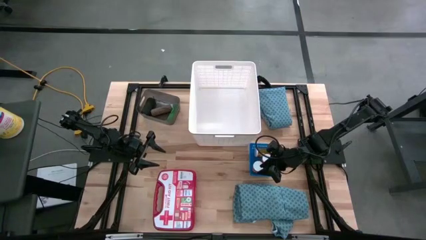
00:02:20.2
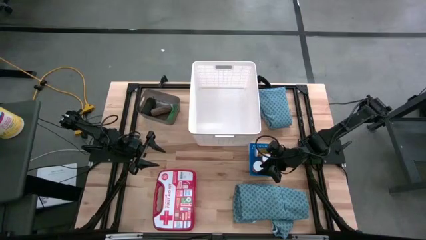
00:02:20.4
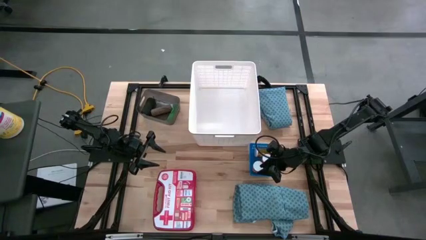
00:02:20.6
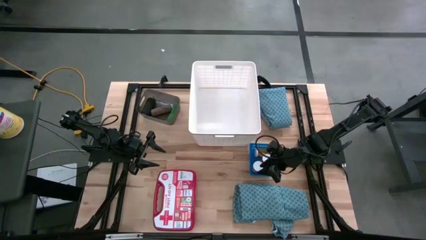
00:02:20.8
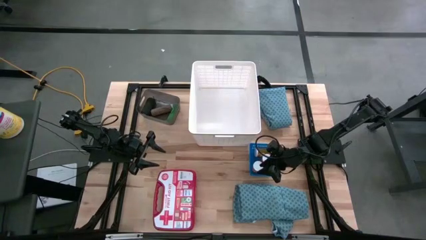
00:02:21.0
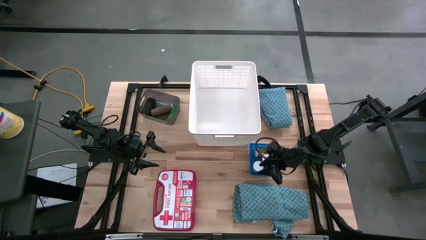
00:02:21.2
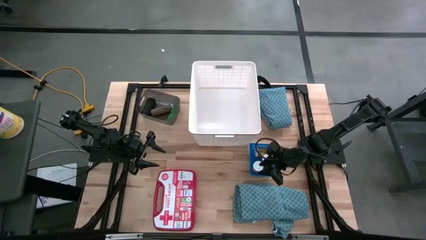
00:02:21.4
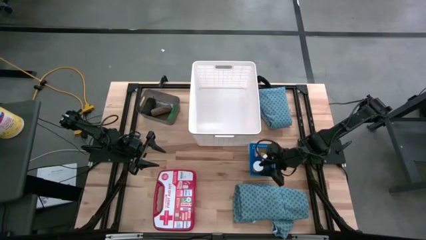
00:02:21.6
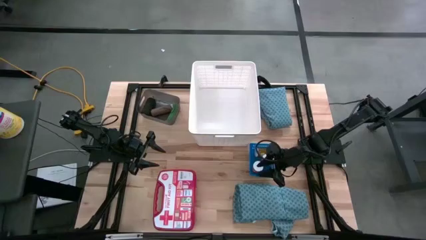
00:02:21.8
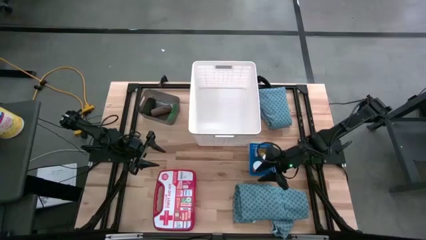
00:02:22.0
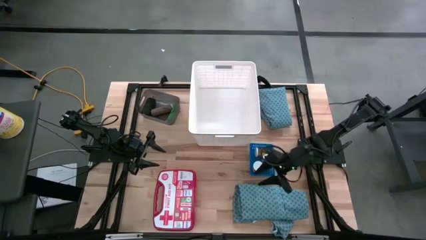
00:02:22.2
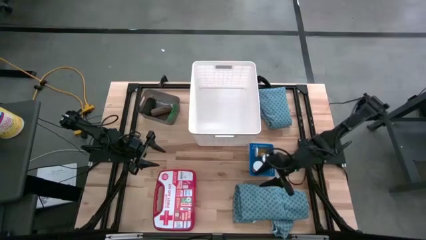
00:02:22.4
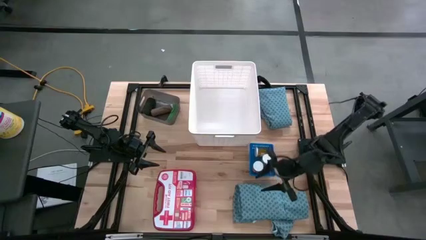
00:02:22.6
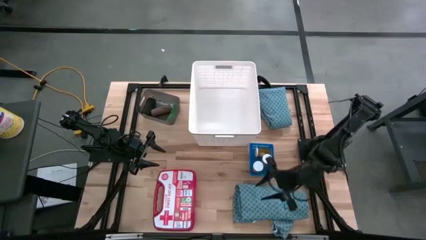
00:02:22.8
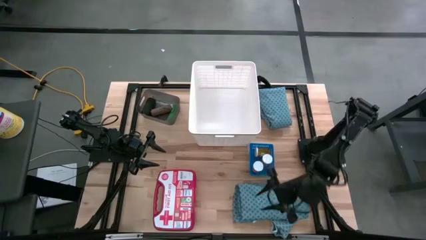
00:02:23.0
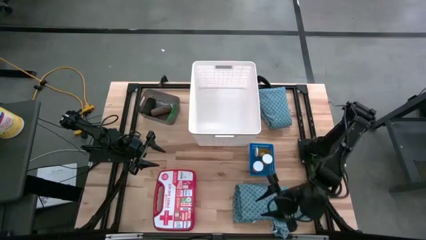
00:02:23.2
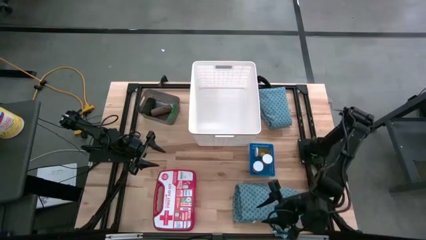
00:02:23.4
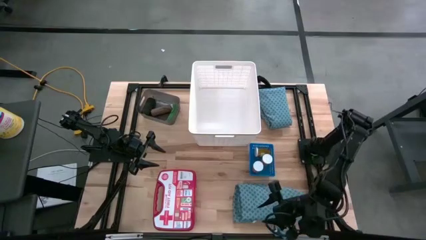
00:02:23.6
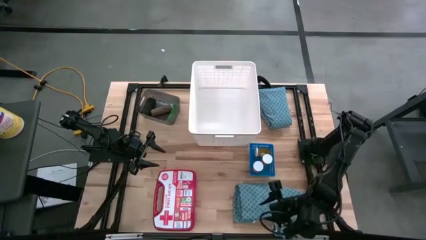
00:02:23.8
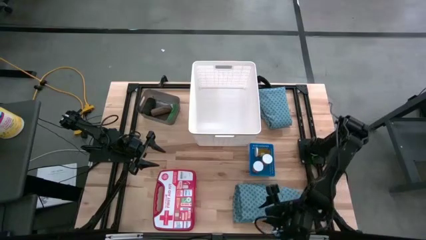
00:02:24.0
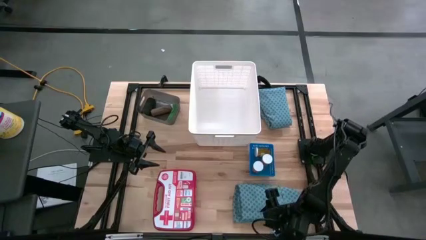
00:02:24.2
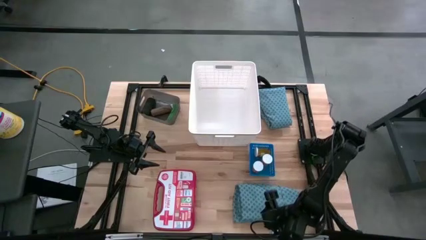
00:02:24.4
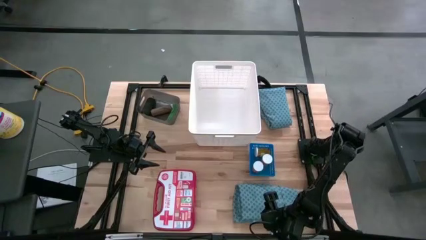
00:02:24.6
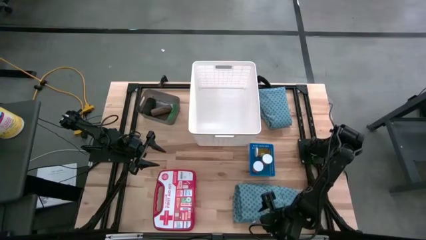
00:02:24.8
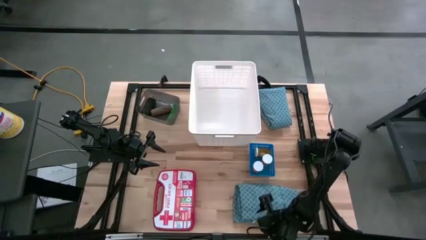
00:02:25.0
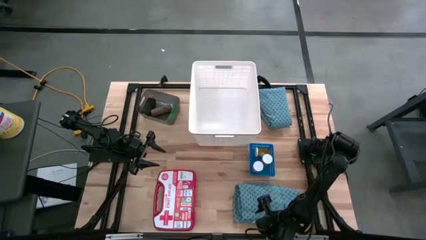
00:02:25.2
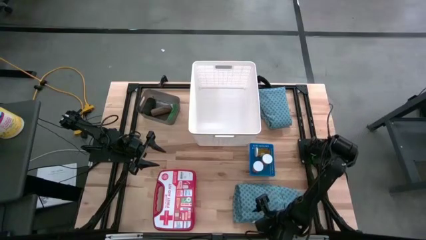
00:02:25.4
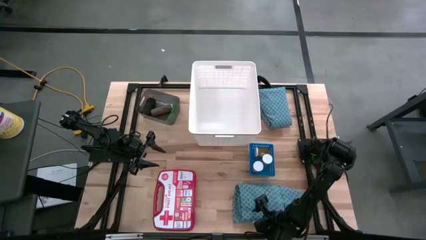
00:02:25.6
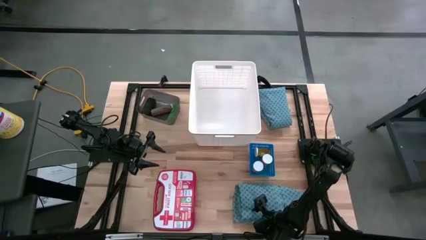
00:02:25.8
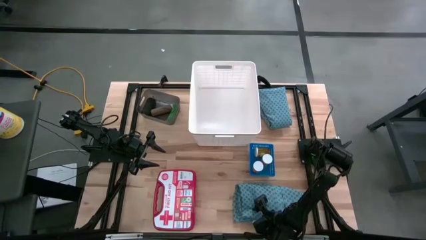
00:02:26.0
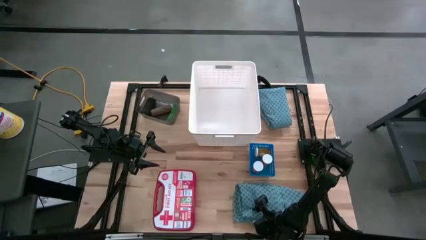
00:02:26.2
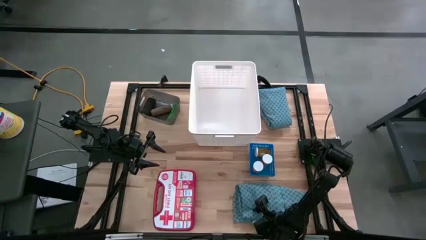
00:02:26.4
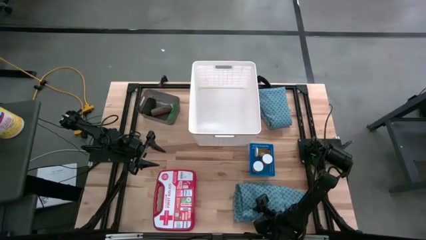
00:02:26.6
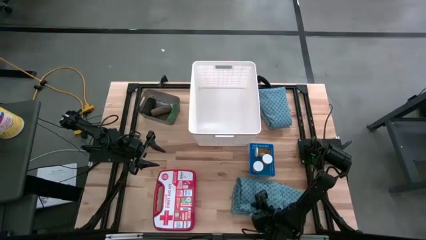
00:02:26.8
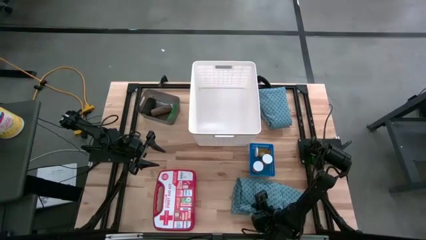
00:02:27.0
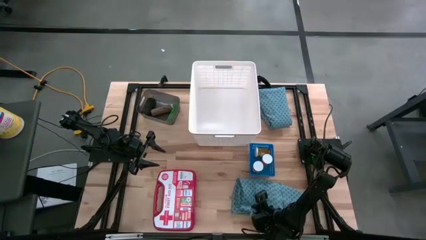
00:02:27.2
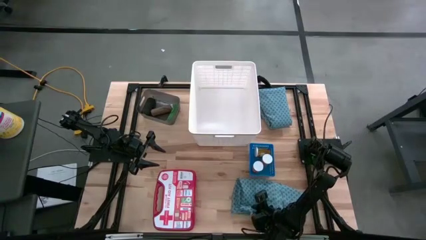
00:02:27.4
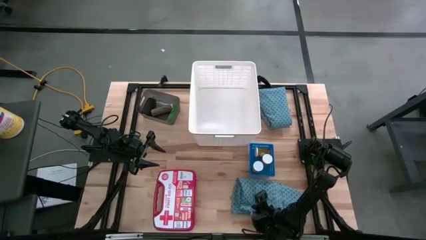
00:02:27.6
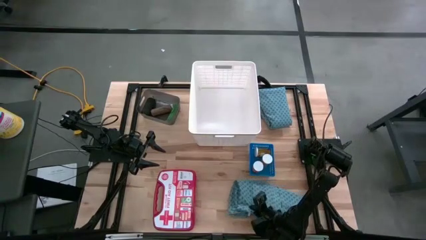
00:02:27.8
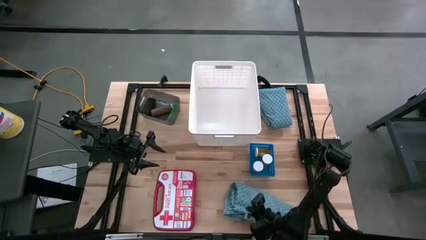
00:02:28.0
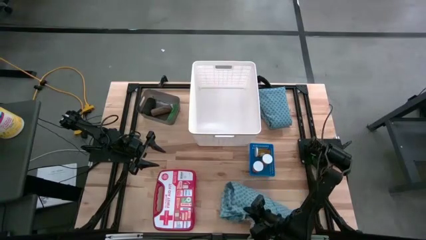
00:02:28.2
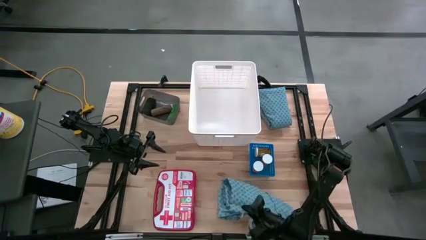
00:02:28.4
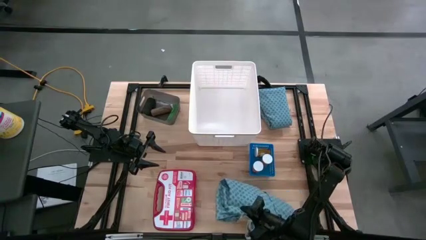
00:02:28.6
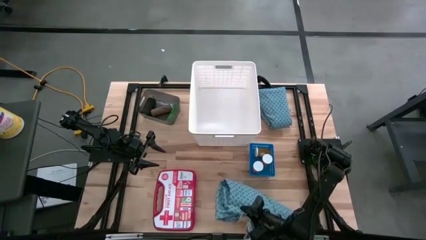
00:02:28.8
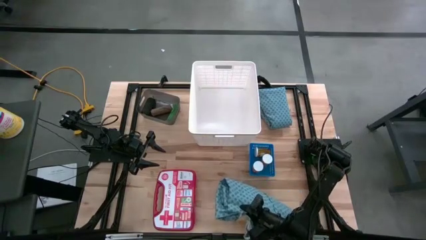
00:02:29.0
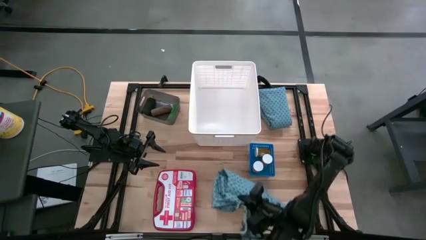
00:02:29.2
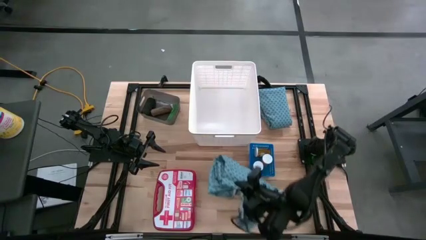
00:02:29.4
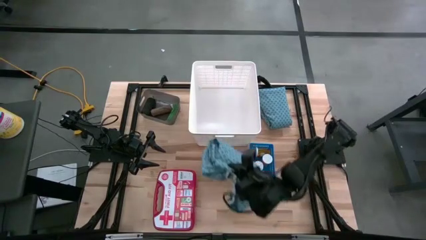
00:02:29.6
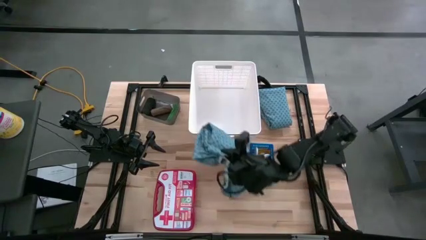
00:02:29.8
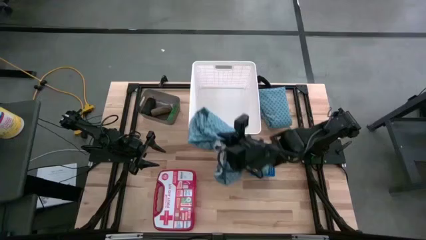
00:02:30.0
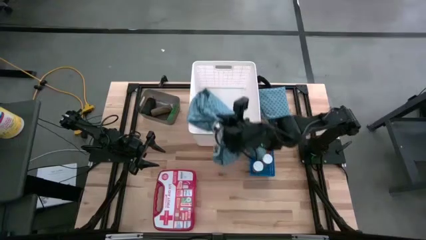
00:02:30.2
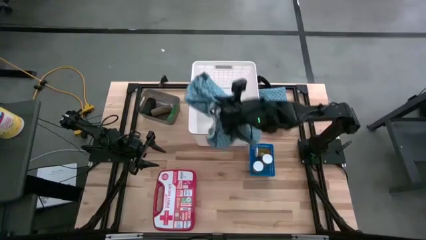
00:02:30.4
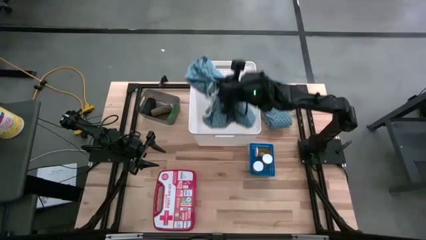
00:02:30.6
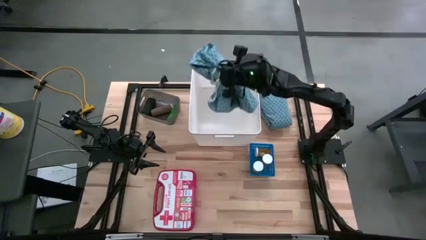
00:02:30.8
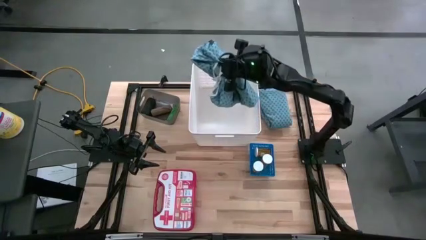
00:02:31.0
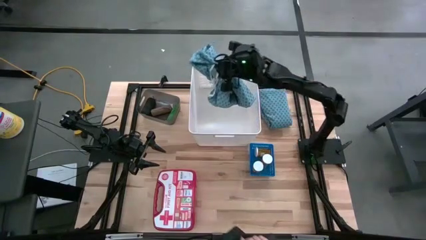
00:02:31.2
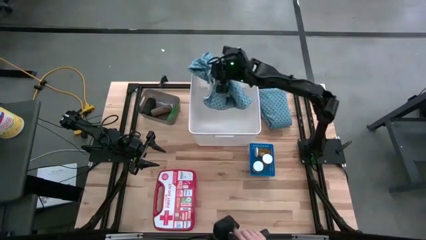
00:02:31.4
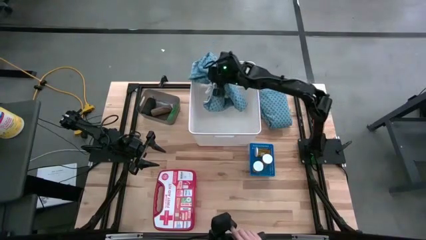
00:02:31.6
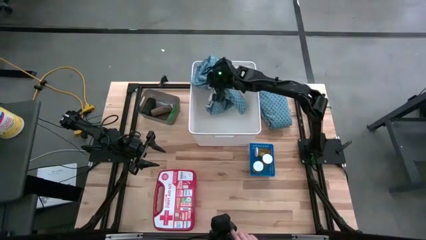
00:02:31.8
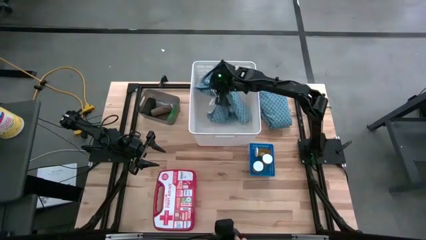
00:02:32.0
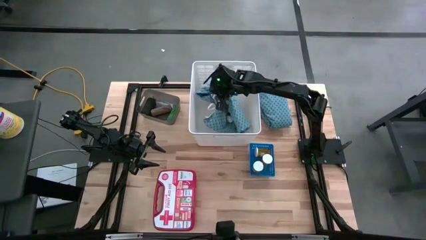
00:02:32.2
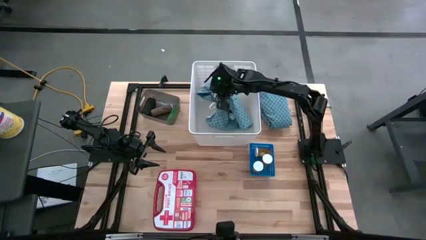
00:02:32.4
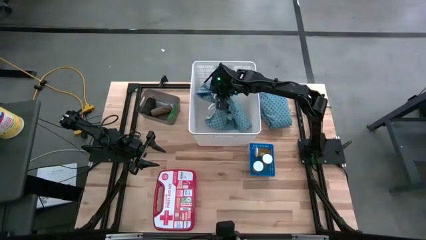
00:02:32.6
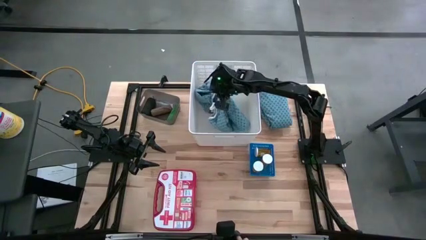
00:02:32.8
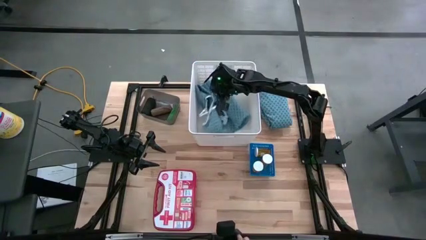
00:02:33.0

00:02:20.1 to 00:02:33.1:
Task: Pick & place medical supplies in basket/bin
Put the bottom patient gown into the white bin

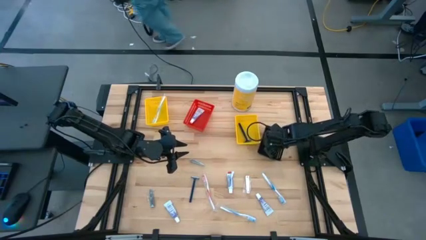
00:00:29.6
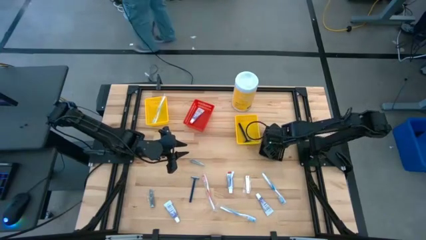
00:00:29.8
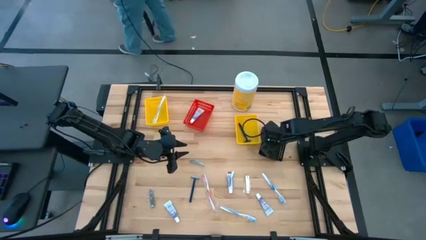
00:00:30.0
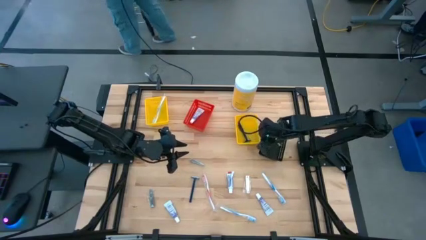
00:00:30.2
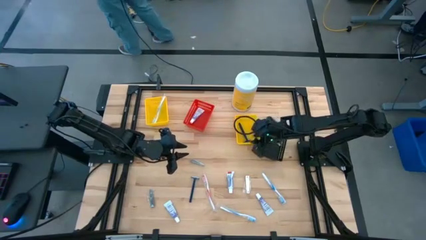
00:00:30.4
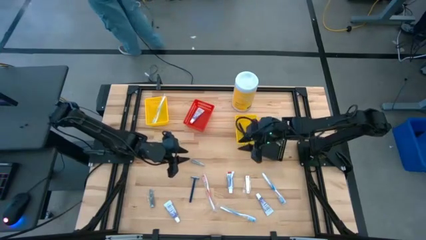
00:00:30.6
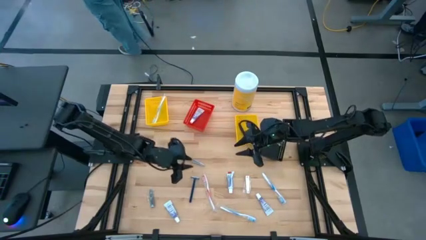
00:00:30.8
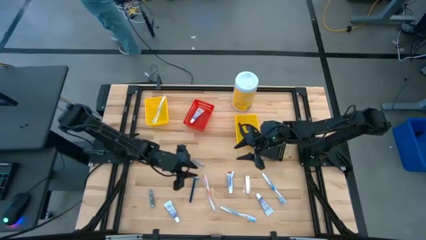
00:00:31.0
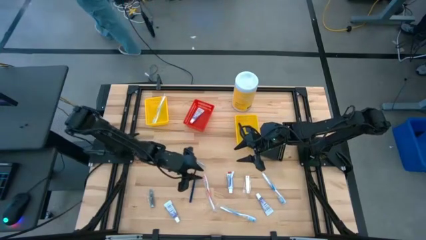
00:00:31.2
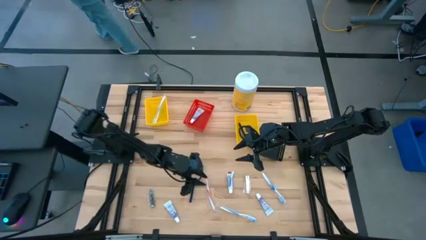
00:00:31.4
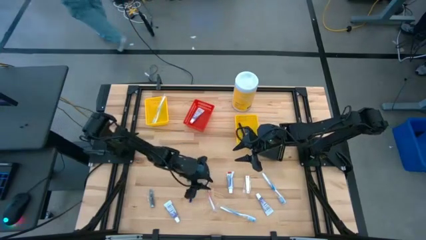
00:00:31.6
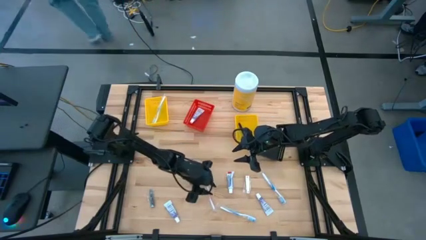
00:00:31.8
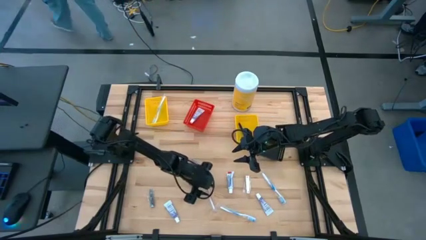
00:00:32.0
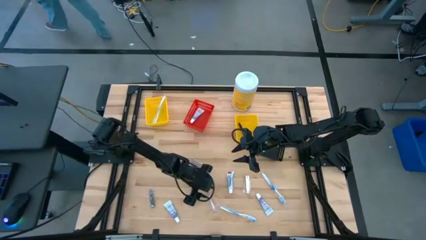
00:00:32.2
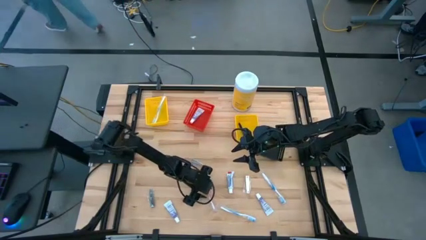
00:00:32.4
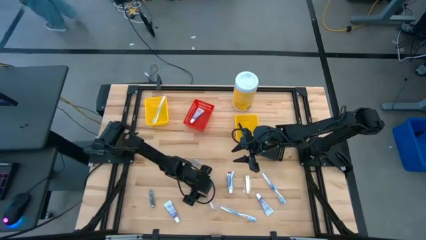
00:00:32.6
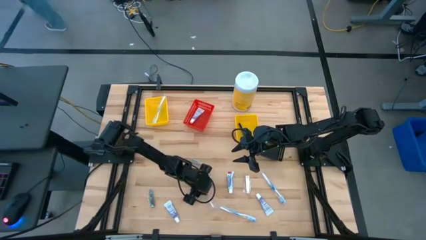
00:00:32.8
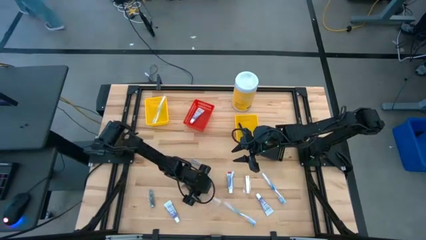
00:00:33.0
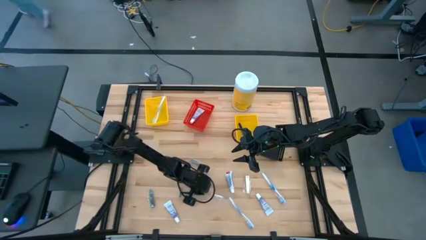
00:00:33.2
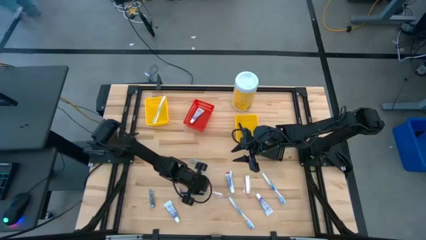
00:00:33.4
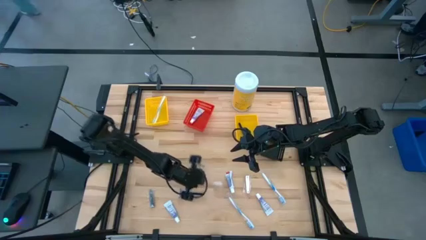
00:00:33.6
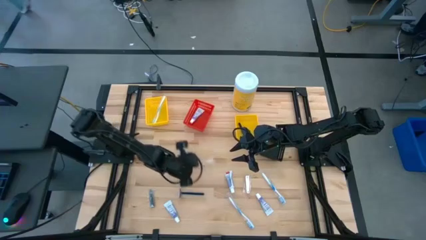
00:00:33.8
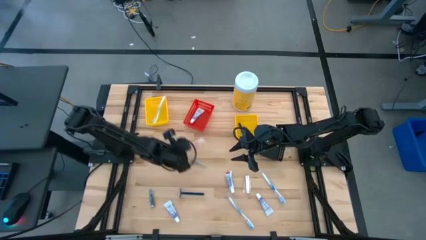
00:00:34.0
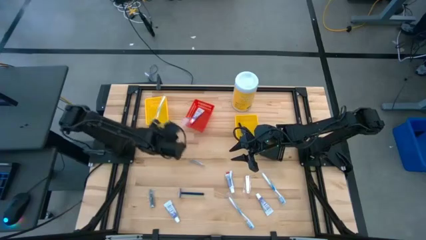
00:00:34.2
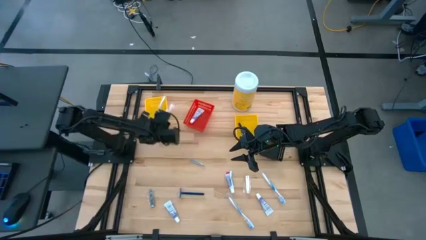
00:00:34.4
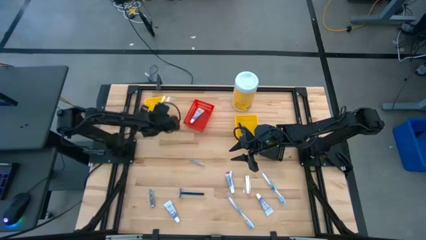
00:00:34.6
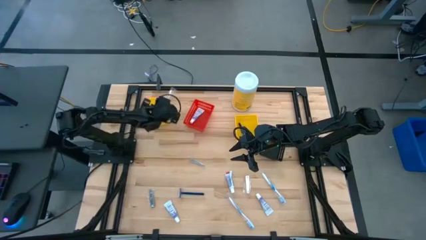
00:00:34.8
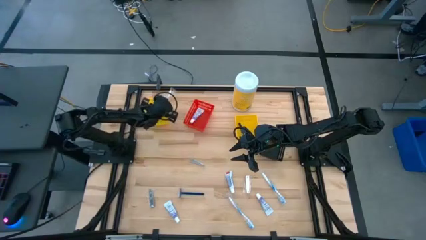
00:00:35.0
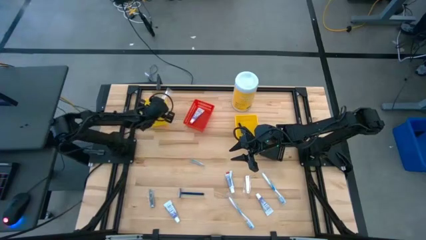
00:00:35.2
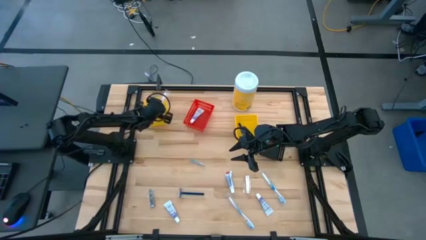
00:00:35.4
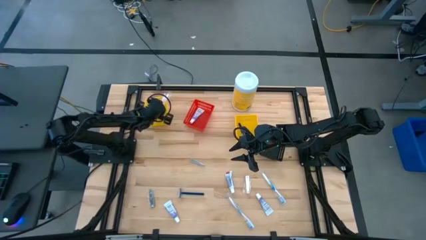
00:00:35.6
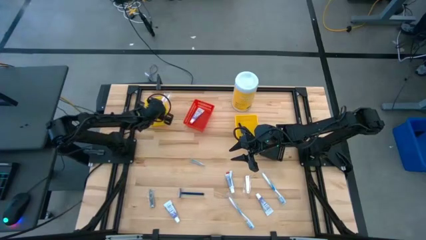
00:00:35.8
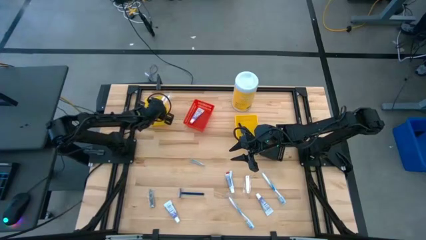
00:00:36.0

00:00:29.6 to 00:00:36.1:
Task: Pick & Place Travel size toiletries
Put the red toothbrush into the left yellow basket
